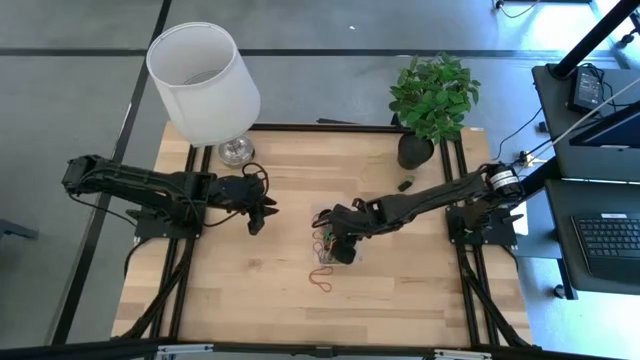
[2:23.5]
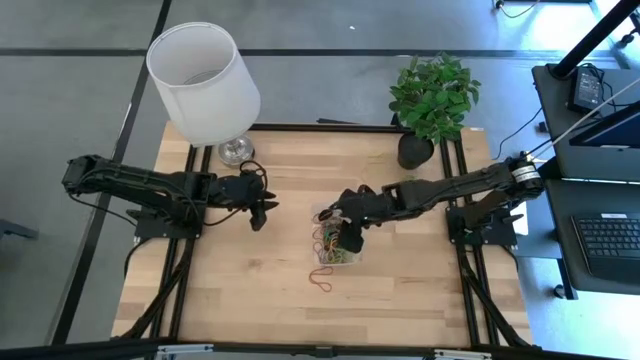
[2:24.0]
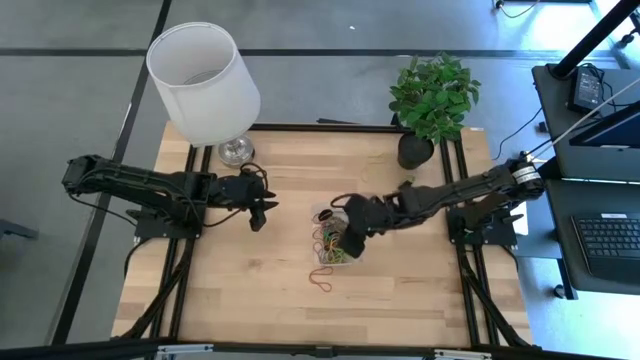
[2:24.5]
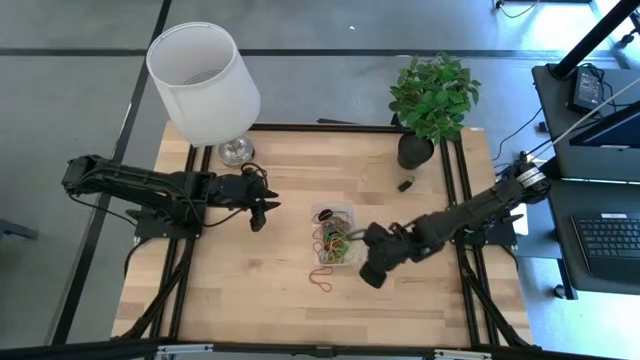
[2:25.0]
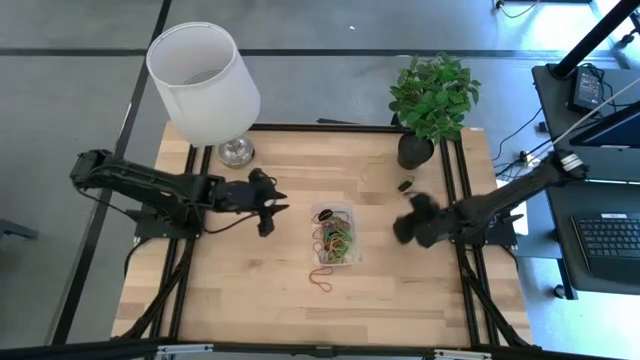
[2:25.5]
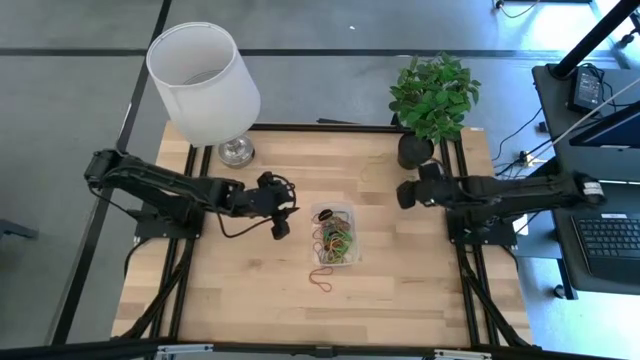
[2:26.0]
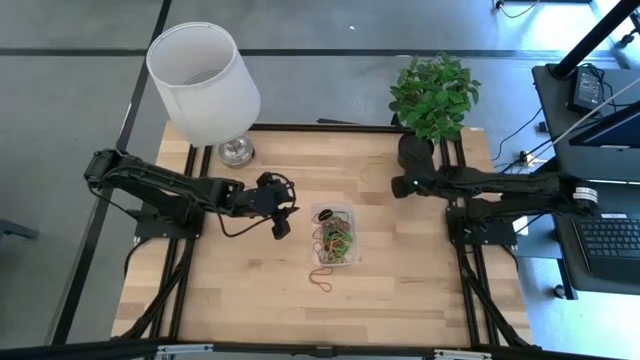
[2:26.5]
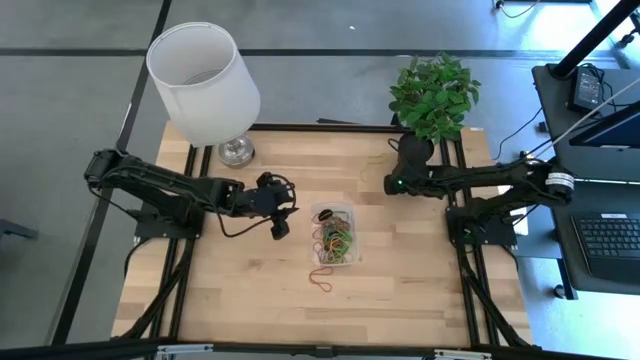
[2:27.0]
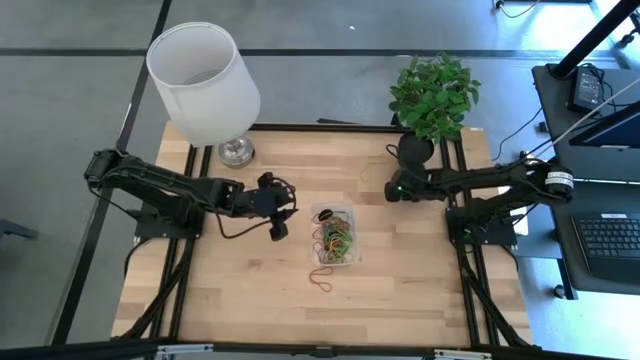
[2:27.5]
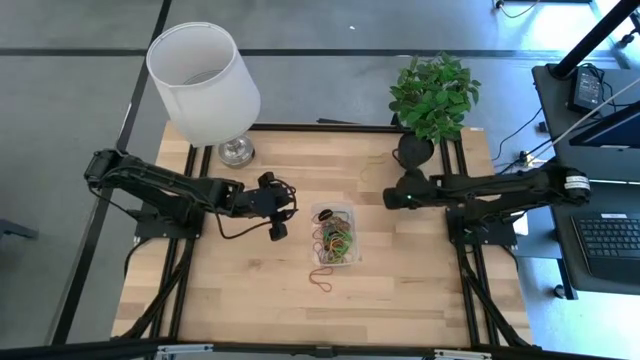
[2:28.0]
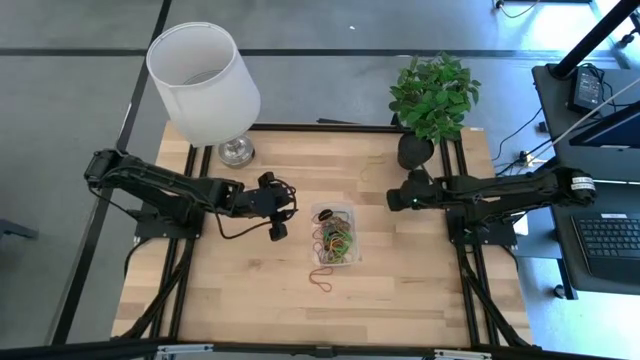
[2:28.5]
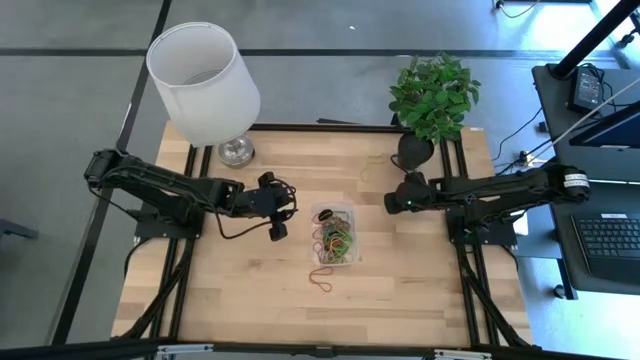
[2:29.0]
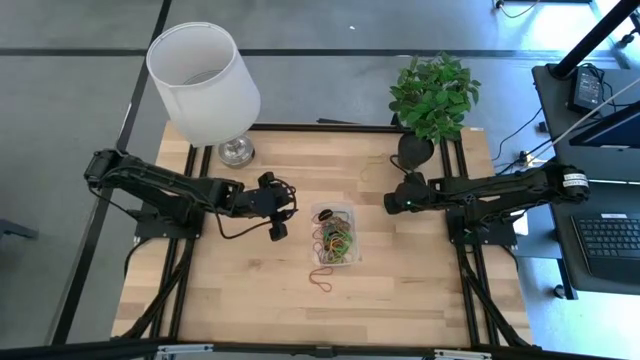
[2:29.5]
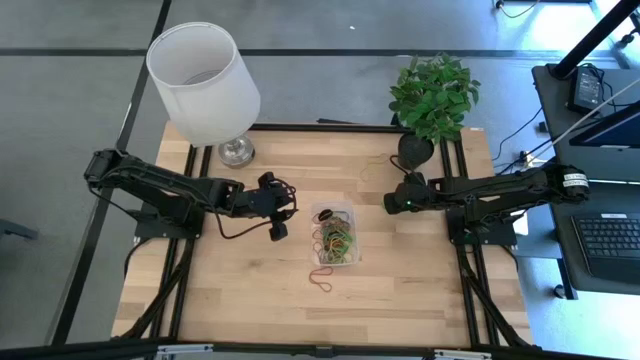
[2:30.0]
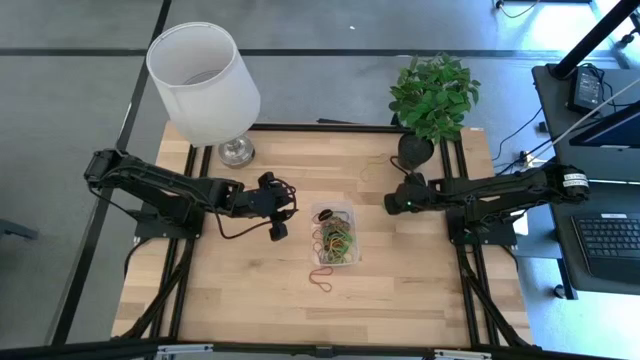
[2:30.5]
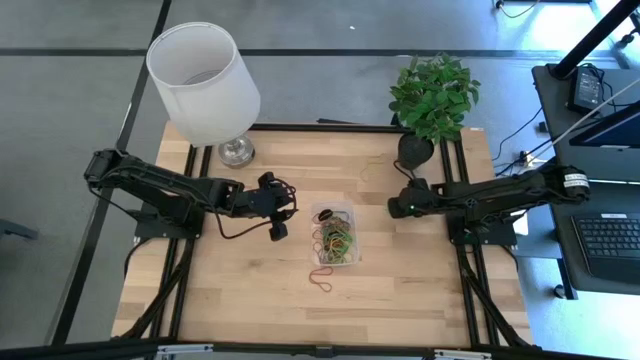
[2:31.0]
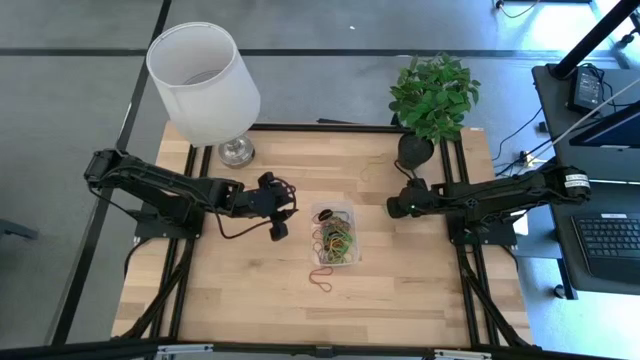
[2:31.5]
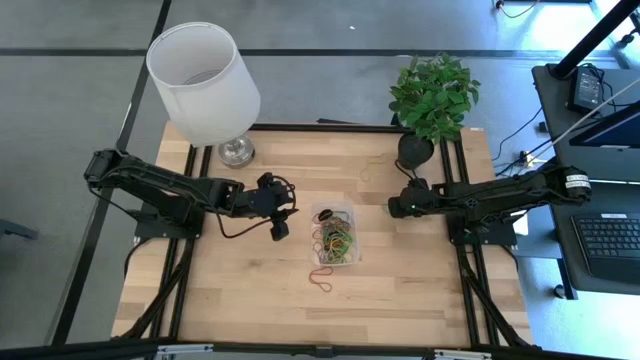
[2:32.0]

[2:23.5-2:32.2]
Task: Pick and place rubber bands into bin
Put the black rubber band into the bin

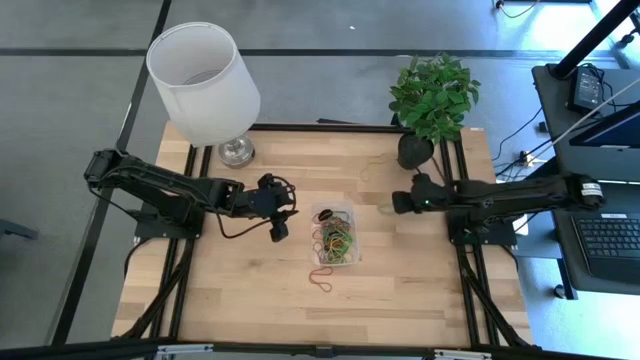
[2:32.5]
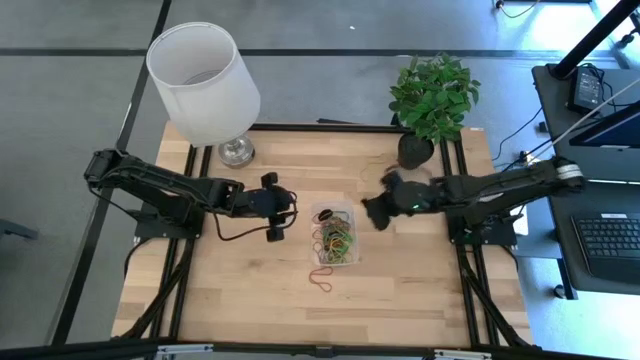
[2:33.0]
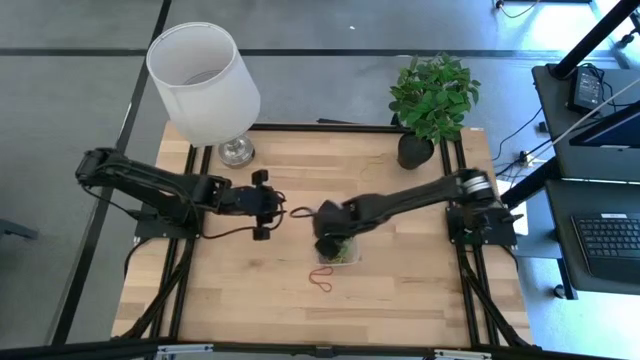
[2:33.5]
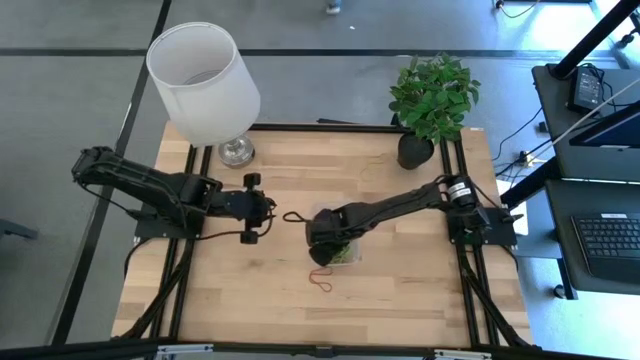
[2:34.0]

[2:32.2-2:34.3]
Put the black rubber band into the bin

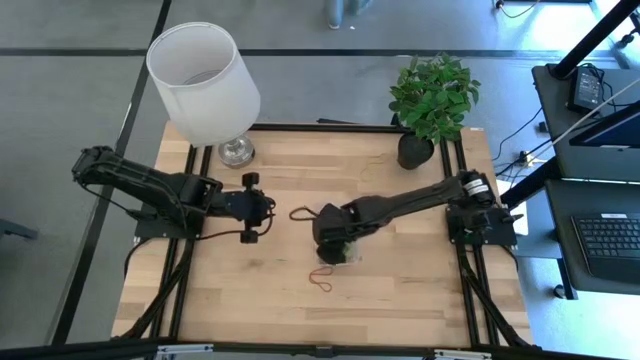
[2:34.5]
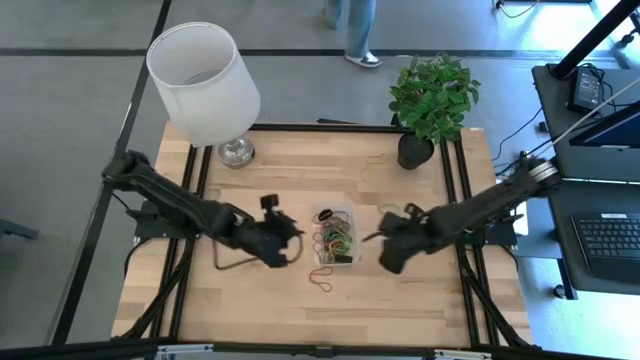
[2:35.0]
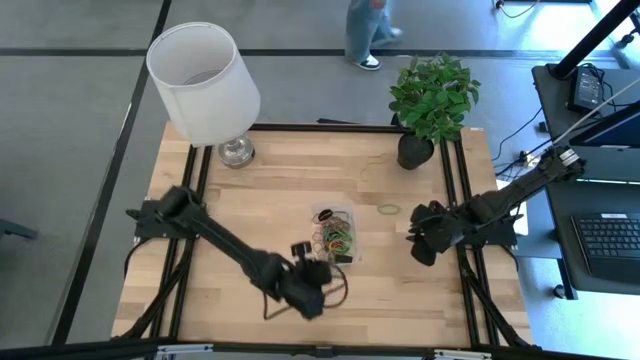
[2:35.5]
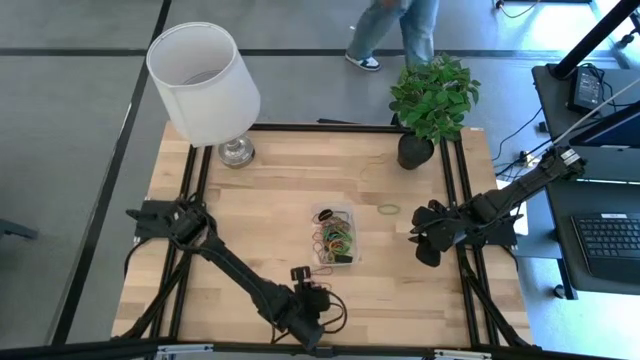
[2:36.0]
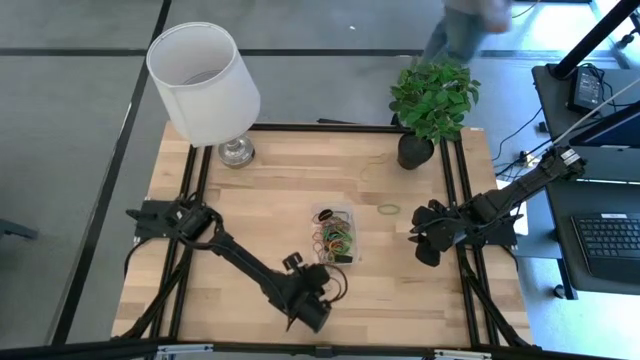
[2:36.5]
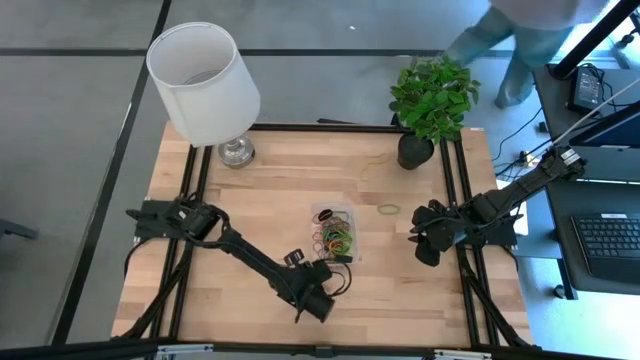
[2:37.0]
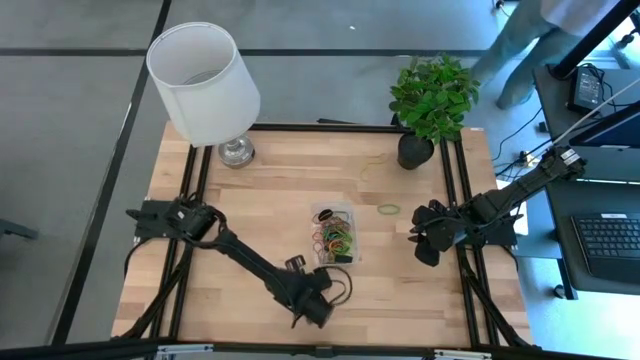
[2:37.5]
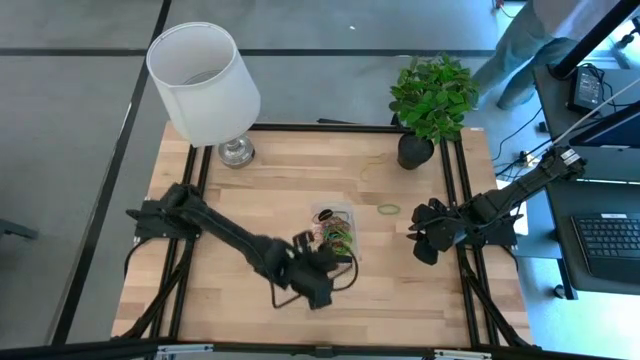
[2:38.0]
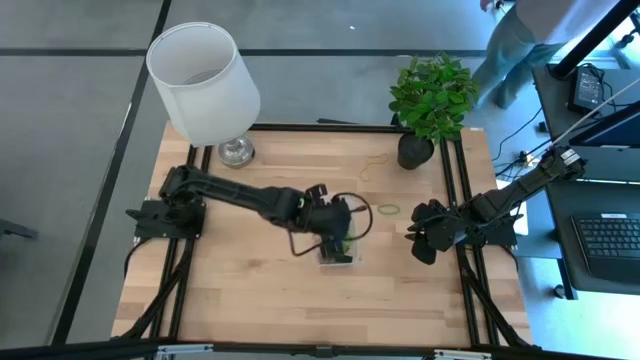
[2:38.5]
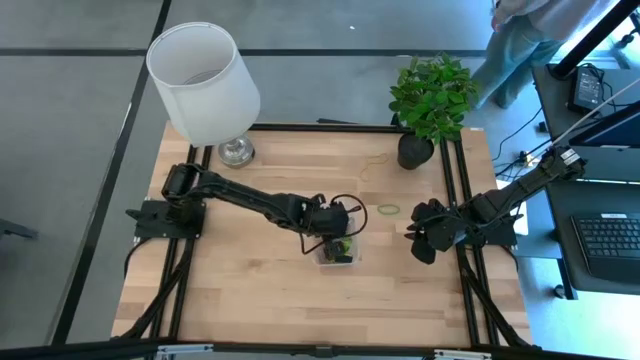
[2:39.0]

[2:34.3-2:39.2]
Put the red rubber band into the bin

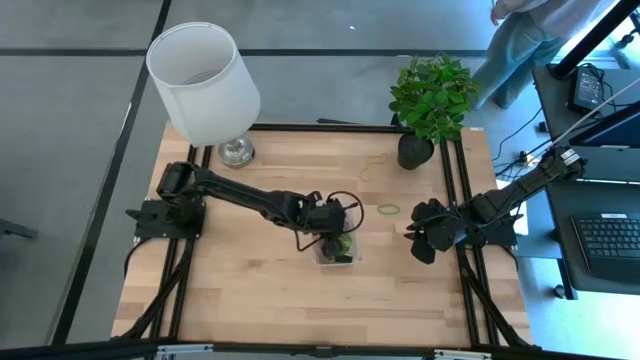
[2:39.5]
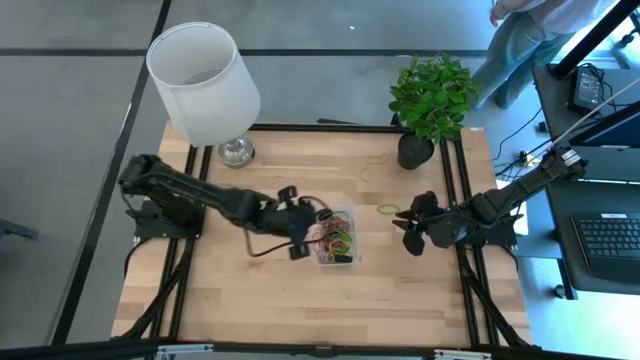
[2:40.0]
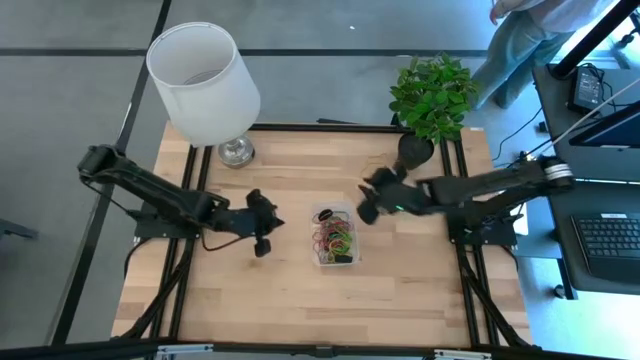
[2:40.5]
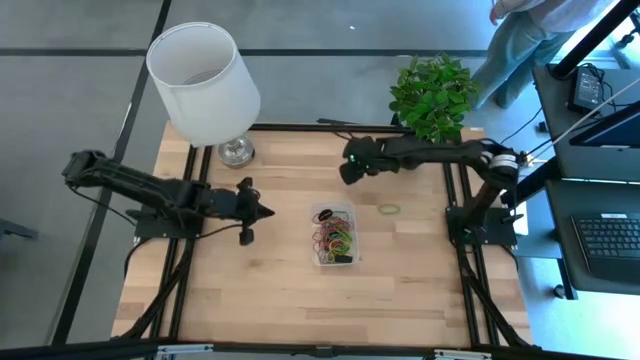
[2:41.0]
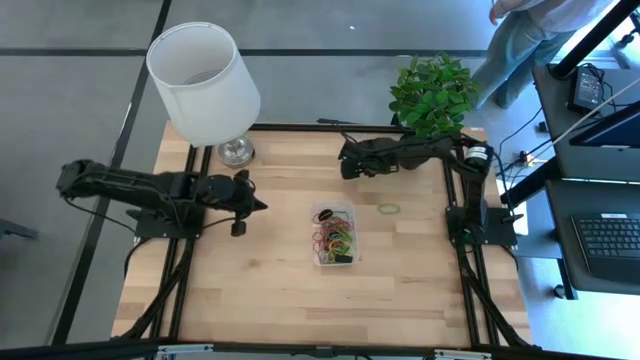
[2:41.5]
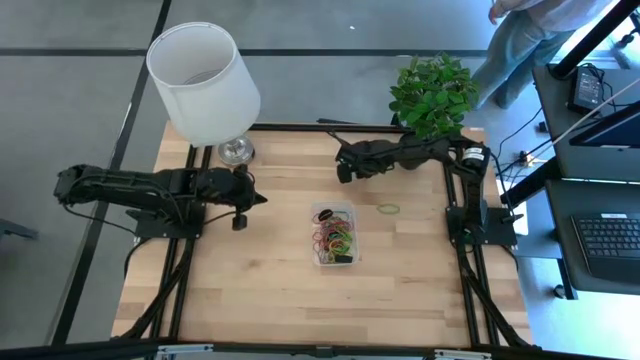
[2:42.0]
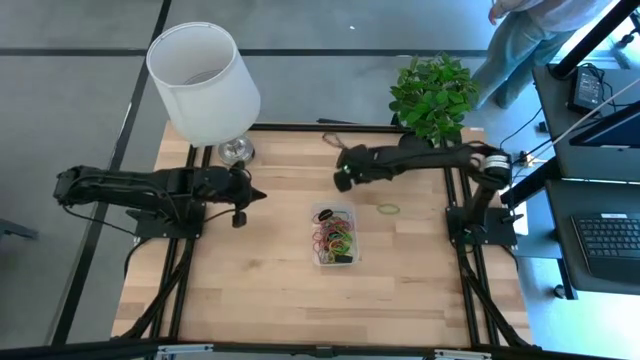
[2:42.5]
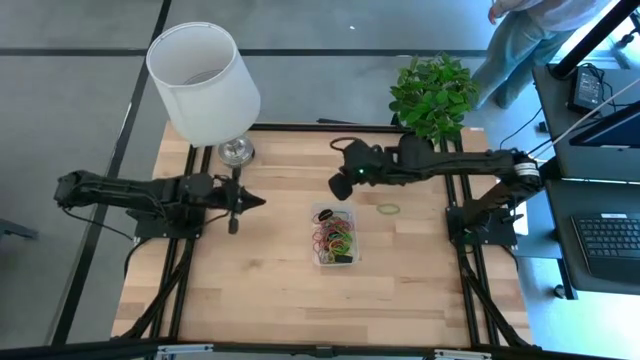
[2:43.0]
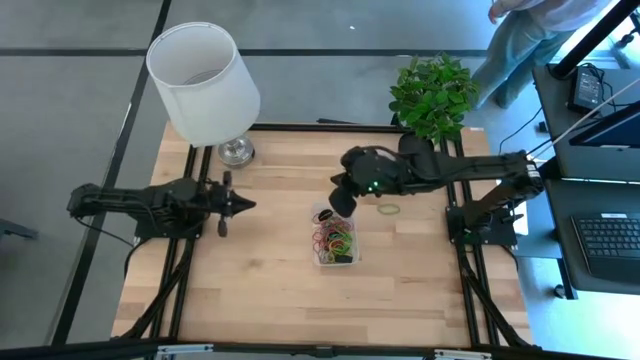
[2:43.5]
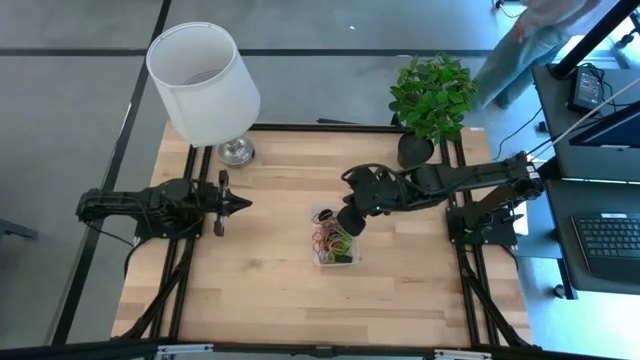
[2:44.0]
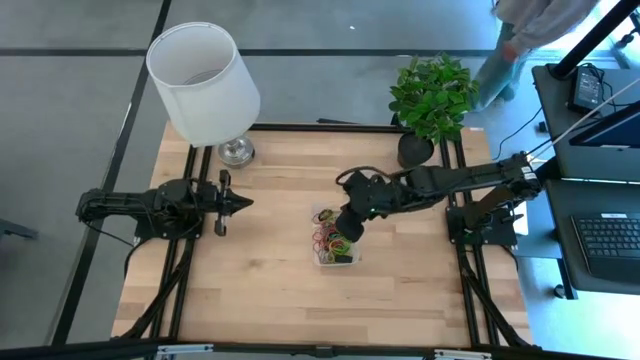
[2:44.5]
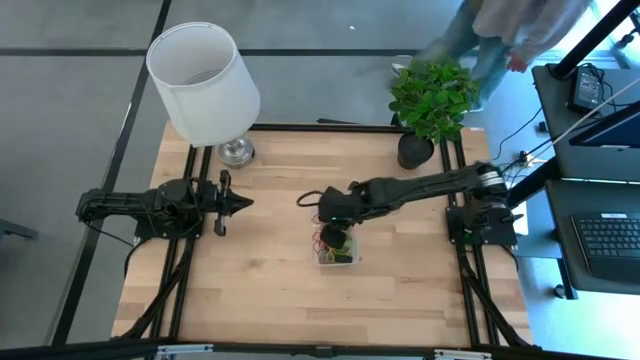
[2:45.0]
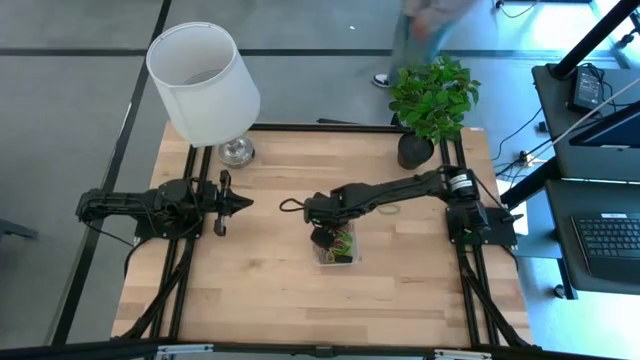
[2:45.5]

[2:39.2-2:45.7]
Put the yellow rubber band into the bin
